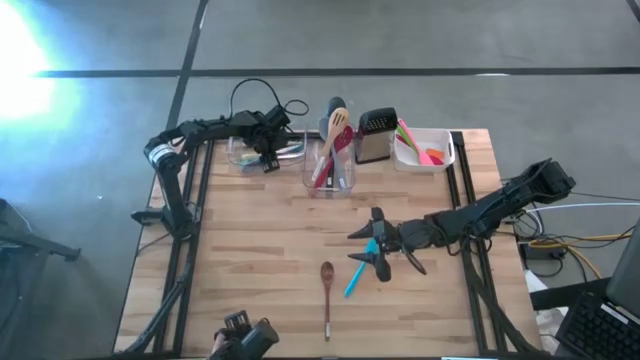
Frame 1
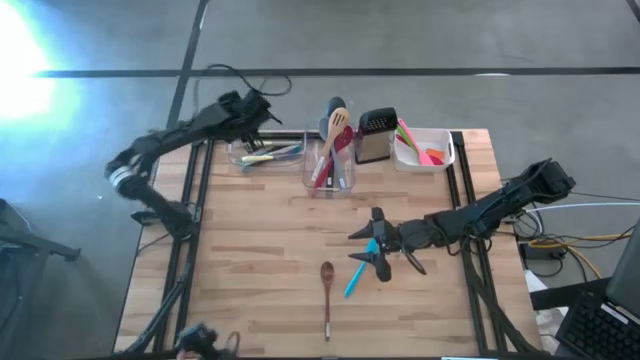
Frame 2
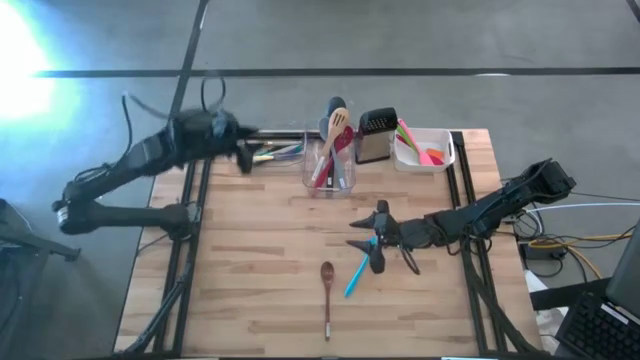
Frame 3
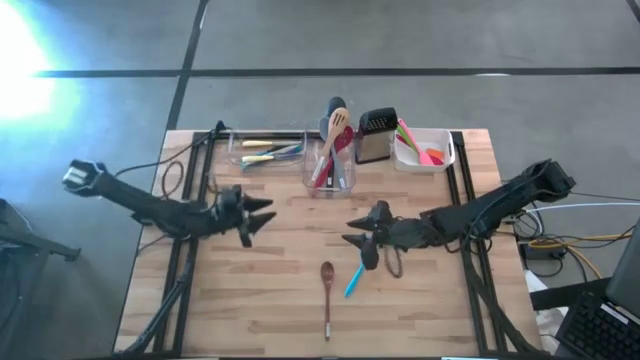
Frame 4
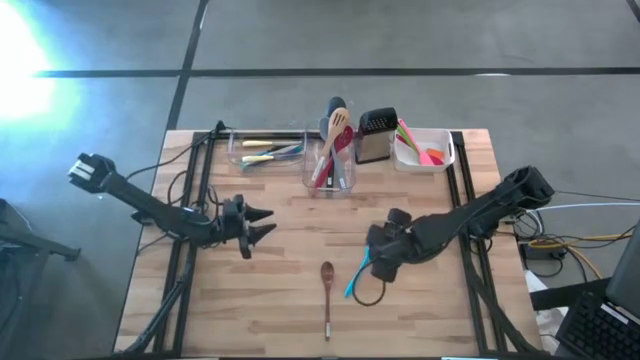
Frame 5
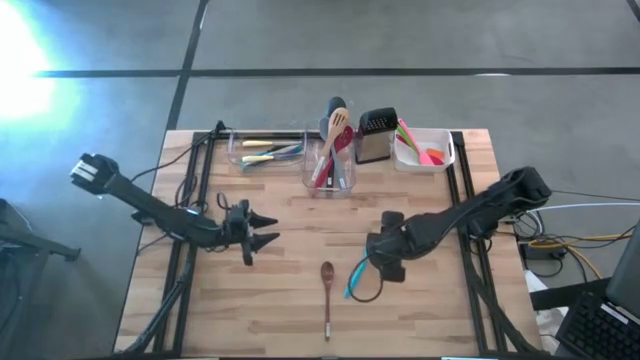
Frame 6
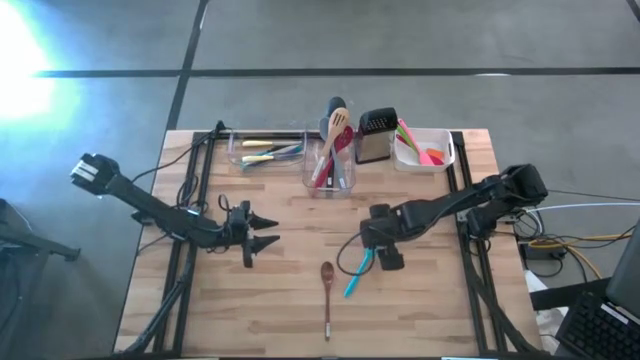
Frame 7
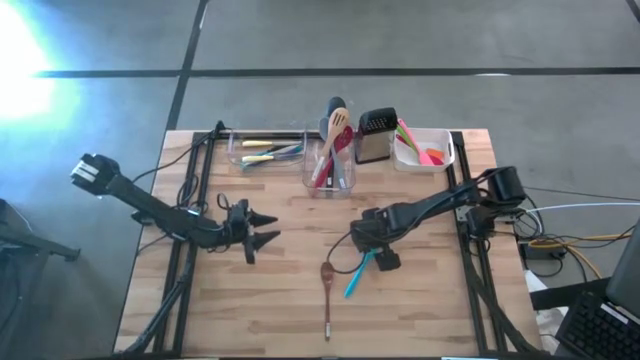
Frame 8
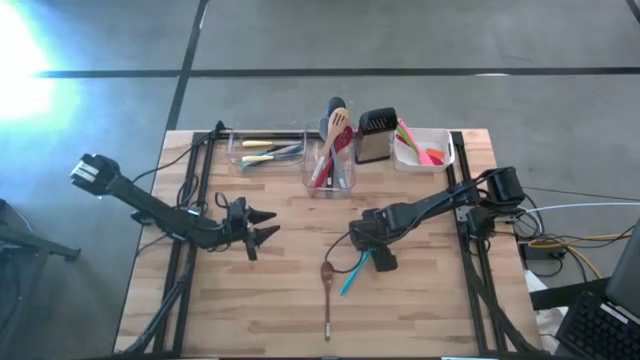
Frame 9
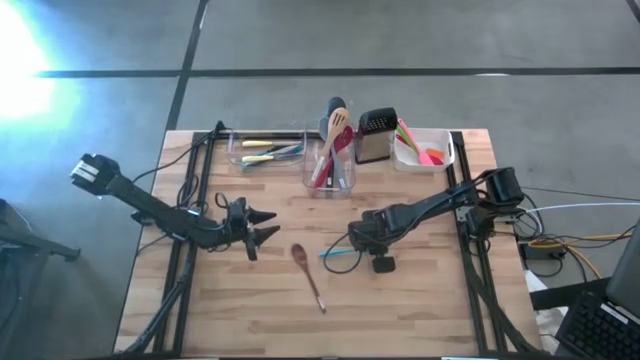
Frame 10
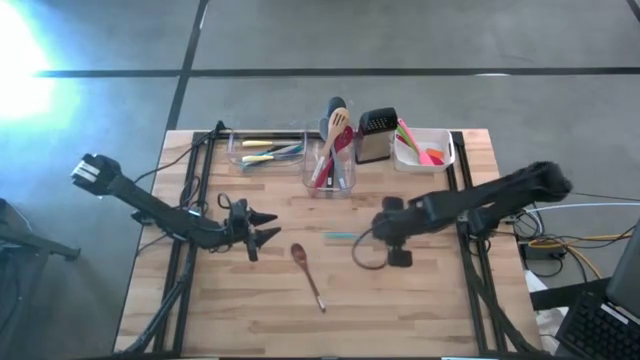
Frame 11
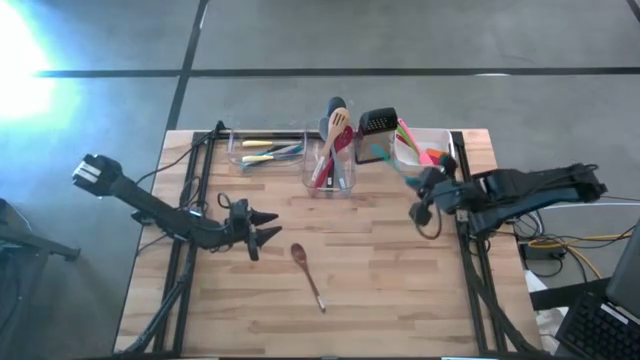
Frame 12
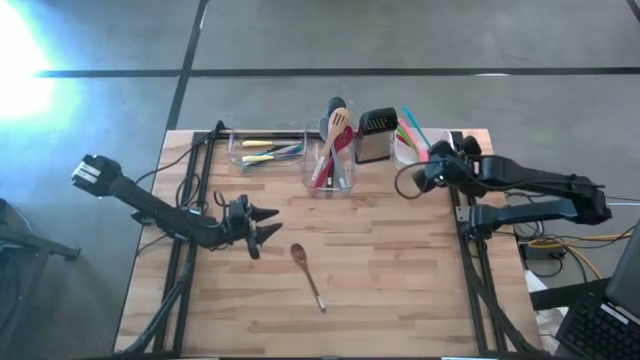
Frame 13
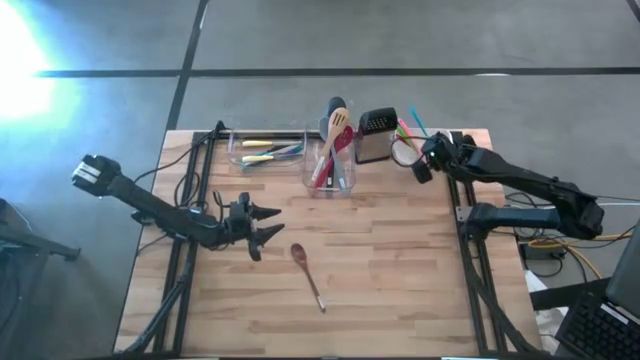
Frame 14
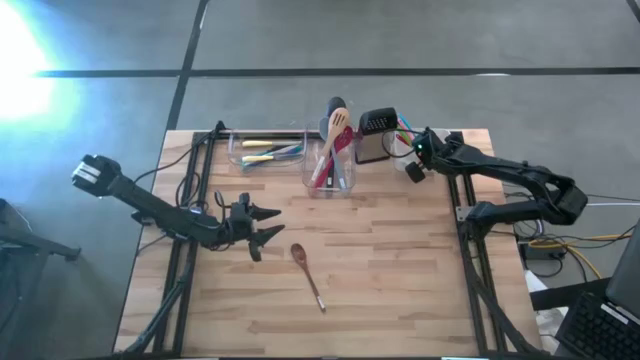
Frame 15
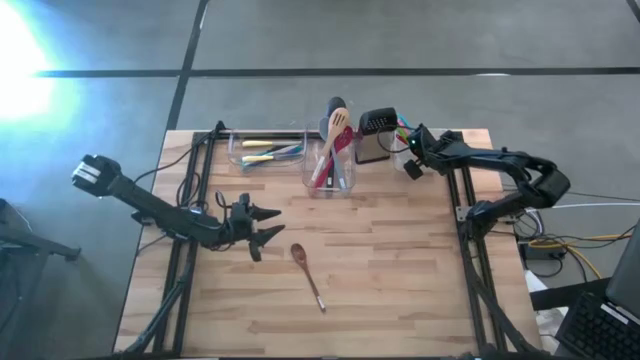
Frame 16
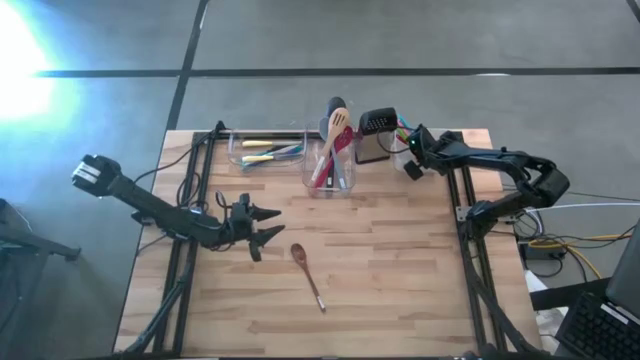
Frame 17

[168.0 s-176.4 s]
Task: Pick & Place Kitchen Items
Put the blue spatula into the white bin

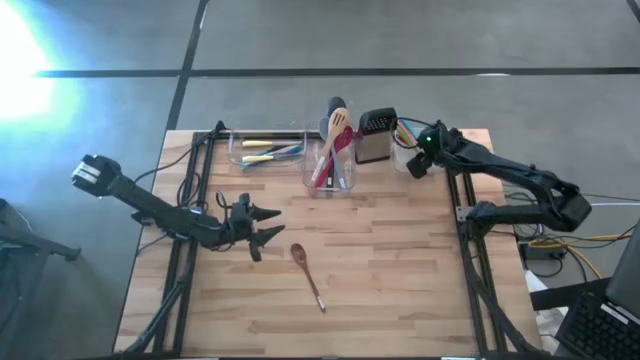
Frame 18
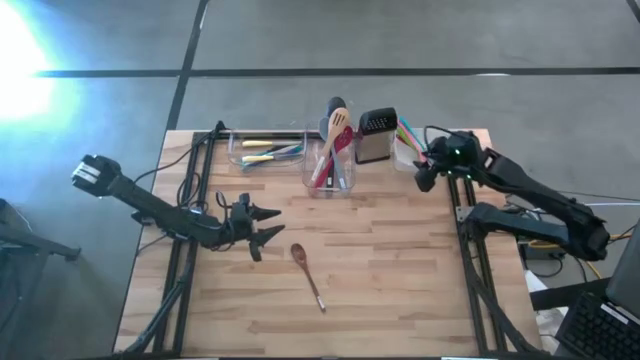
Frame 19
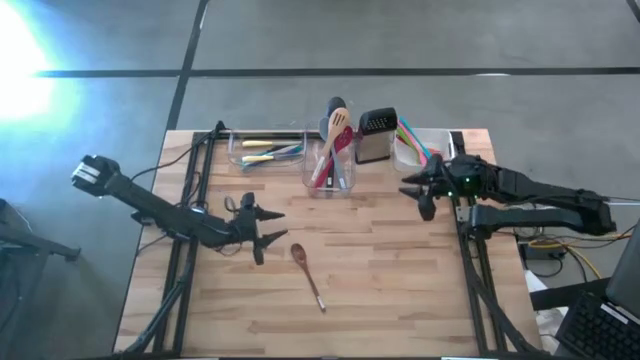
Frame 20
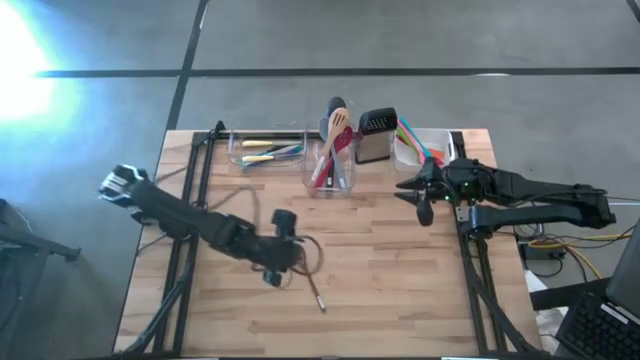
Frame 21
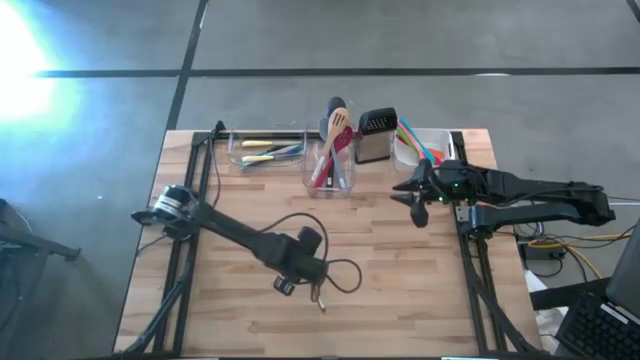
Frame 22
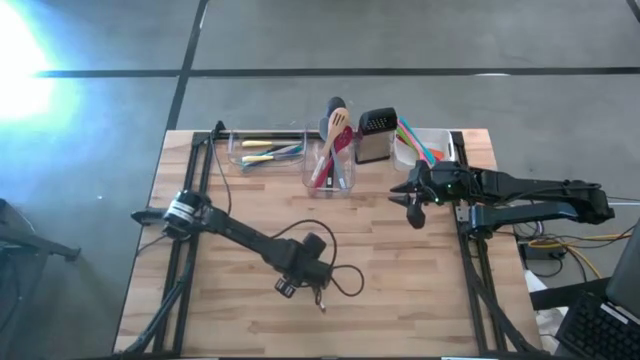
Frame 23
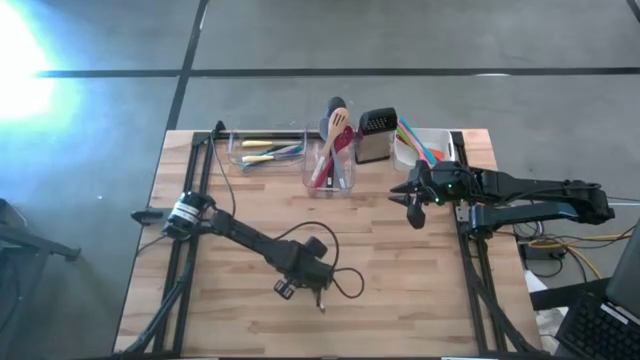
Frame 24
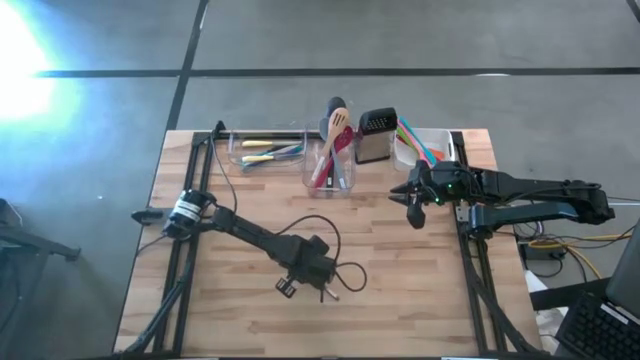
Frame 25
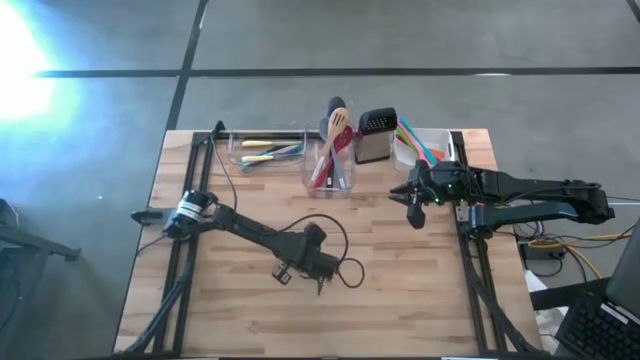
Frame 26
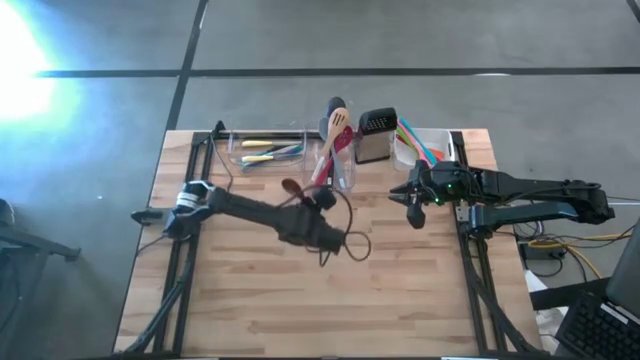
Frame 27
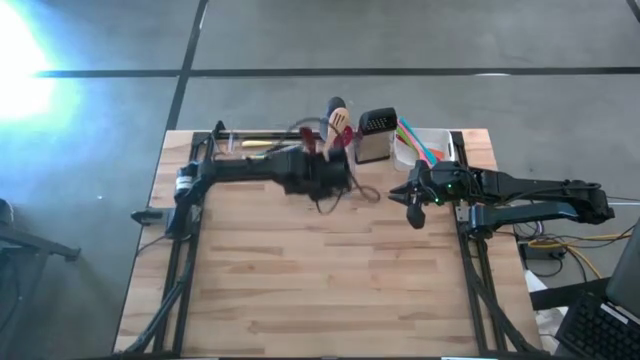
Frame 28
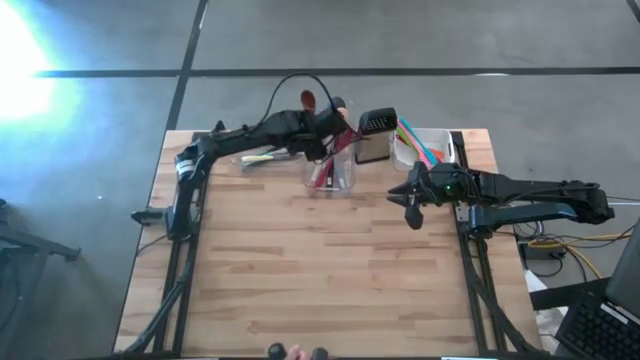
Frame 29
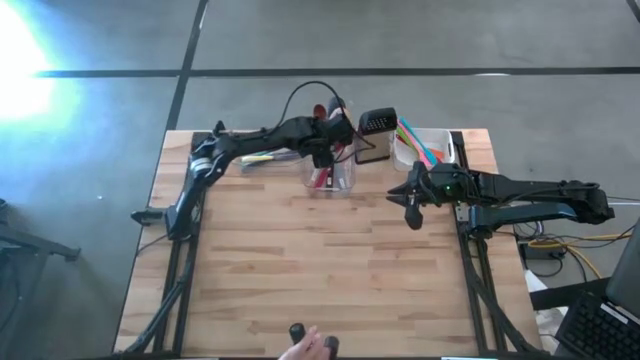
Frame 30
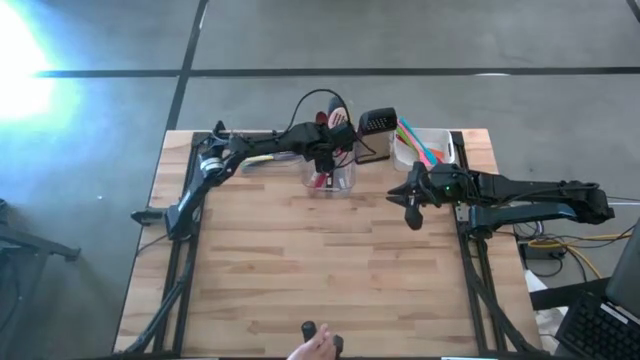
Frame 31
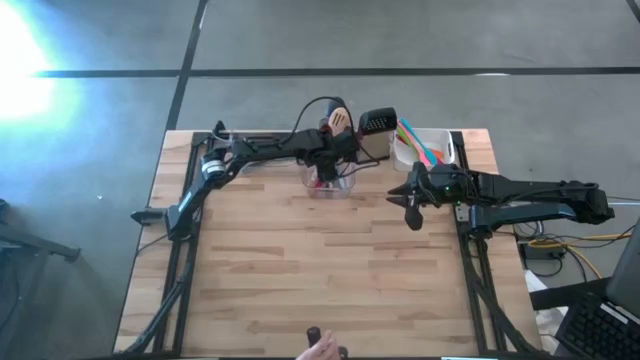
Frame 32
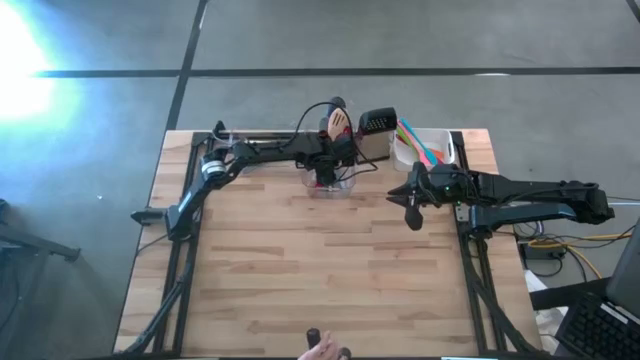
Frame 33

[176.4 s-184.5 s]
Put the dark brown serving spoon into the right transparent bin

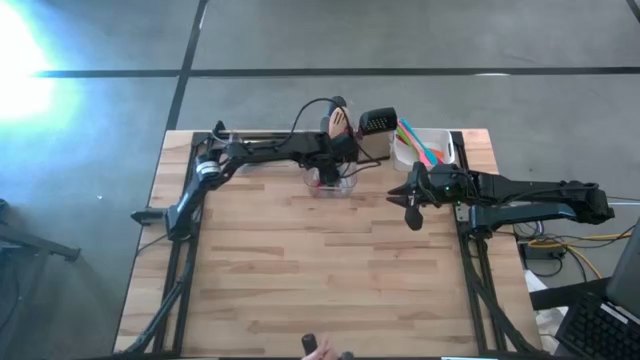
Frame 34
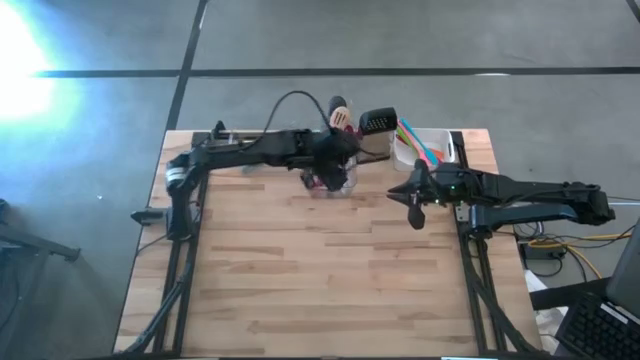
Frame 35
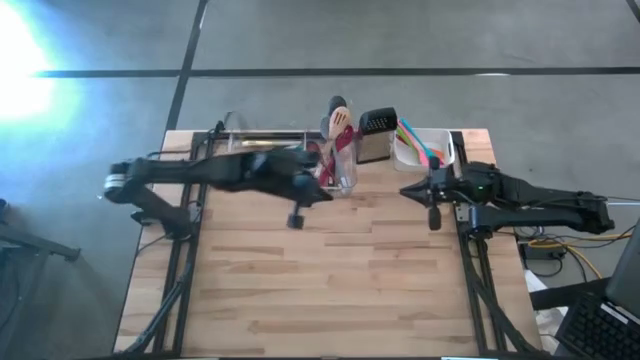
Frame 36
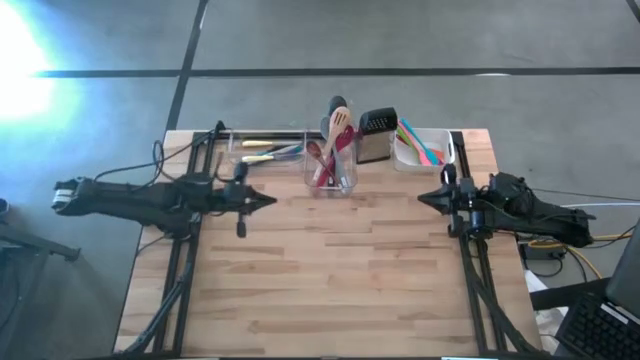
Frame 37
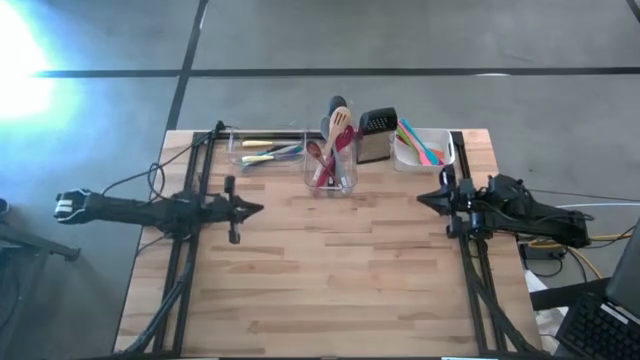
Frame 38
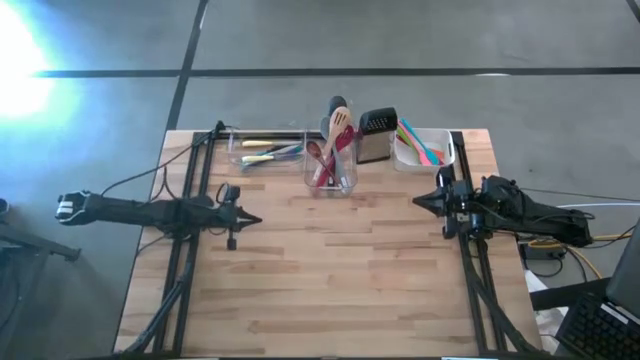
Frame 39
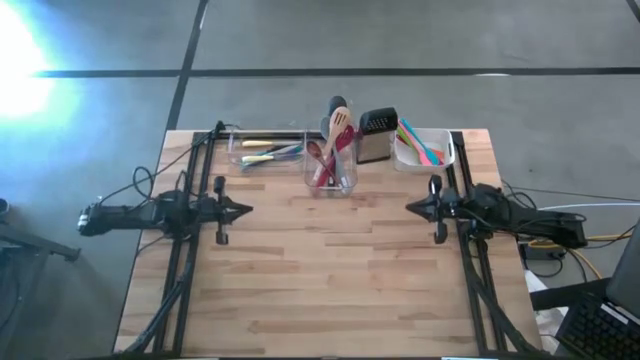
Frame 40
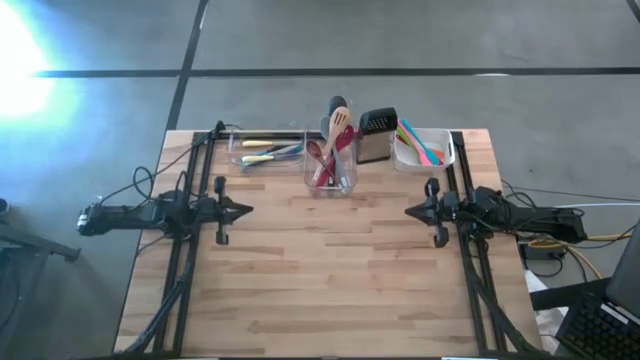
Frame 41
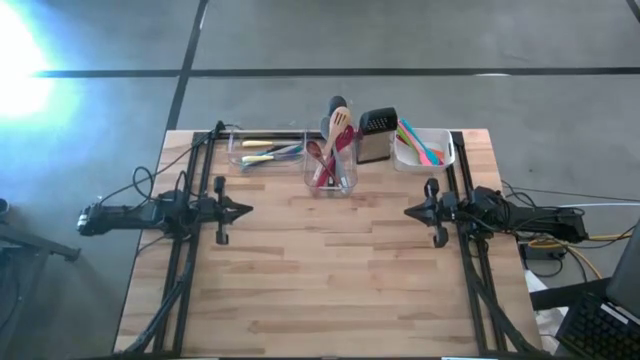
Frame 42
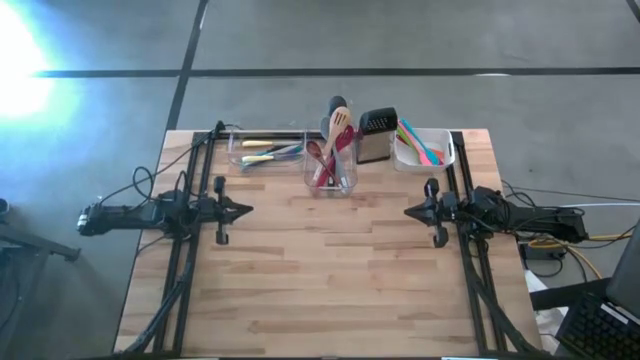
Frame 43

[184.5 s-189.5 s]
Return to Home Position
